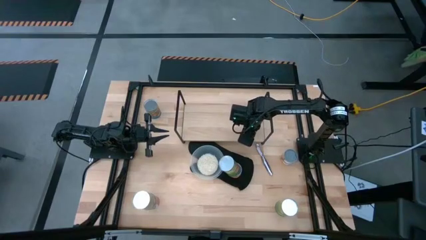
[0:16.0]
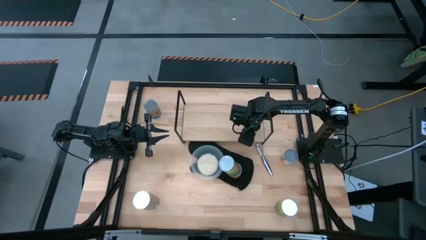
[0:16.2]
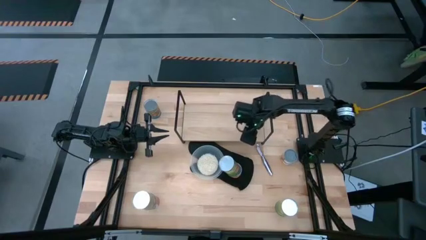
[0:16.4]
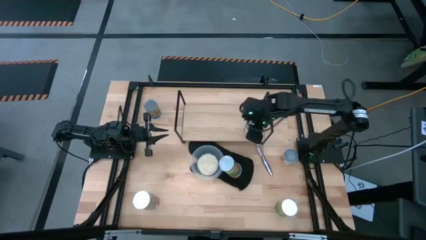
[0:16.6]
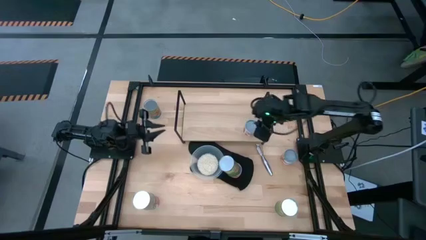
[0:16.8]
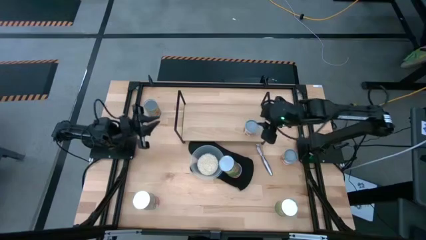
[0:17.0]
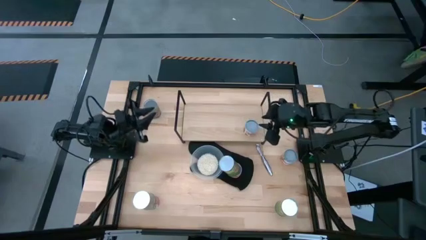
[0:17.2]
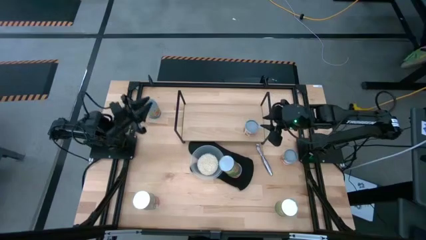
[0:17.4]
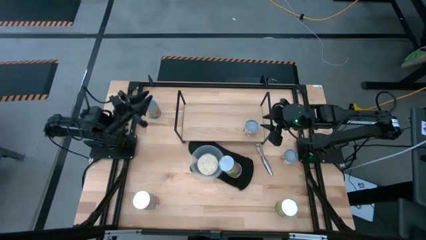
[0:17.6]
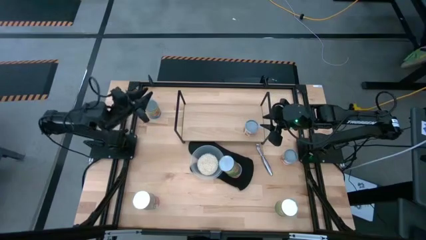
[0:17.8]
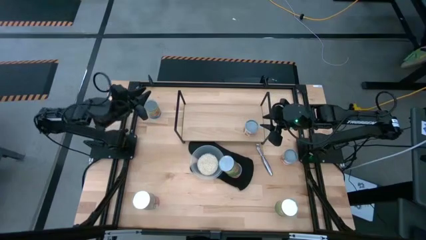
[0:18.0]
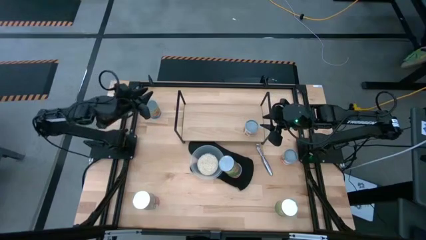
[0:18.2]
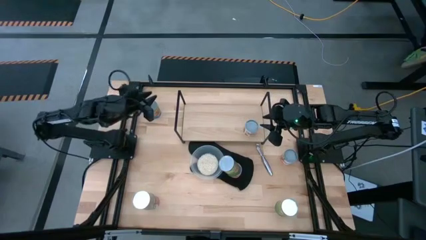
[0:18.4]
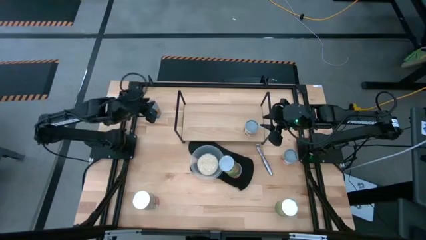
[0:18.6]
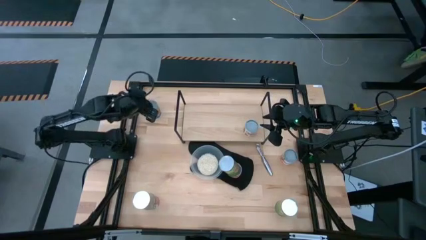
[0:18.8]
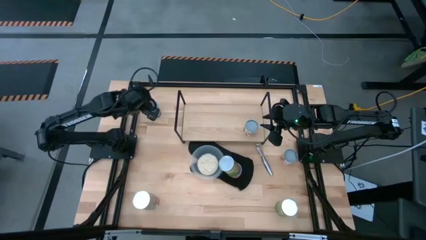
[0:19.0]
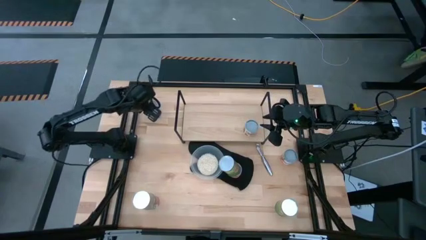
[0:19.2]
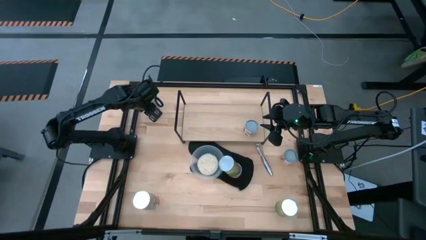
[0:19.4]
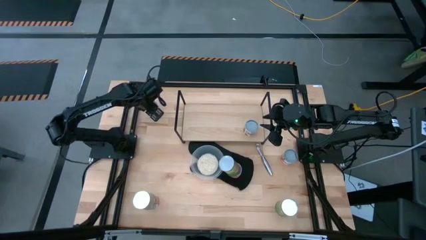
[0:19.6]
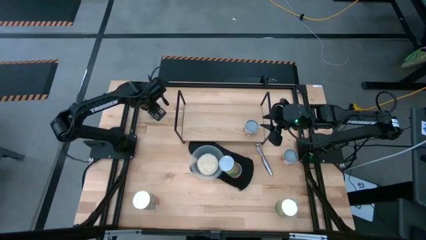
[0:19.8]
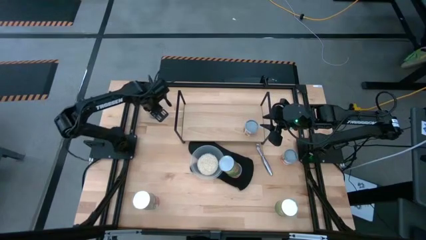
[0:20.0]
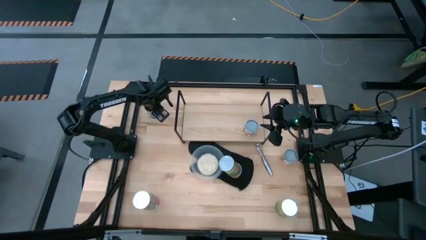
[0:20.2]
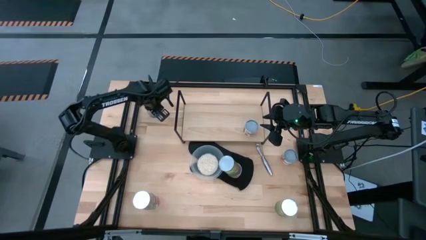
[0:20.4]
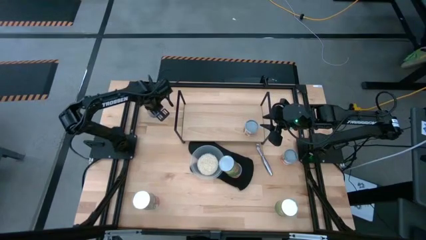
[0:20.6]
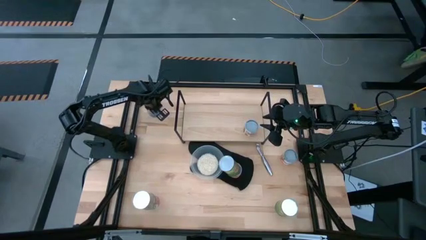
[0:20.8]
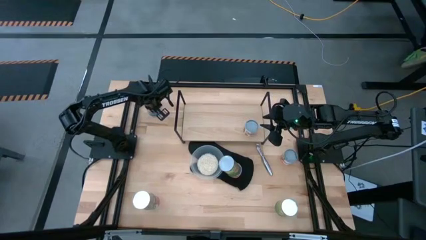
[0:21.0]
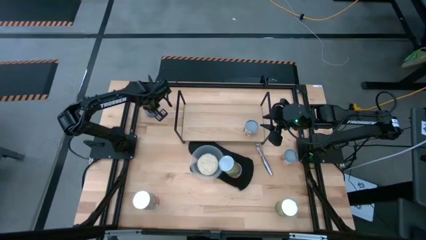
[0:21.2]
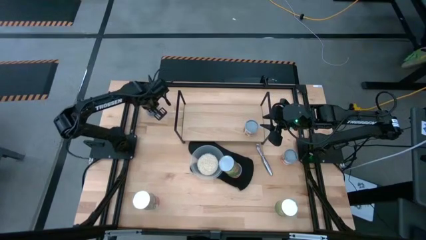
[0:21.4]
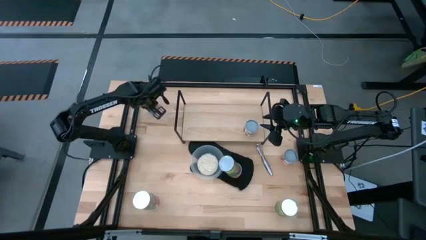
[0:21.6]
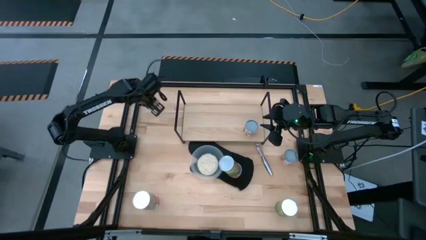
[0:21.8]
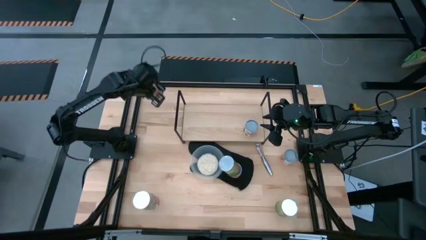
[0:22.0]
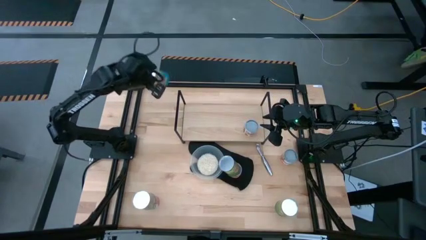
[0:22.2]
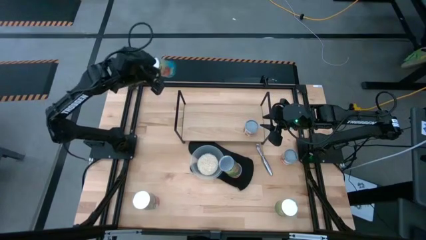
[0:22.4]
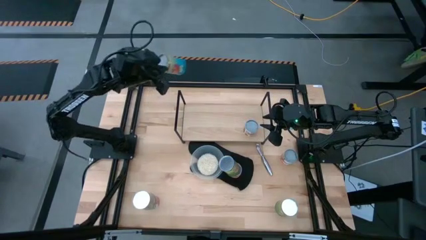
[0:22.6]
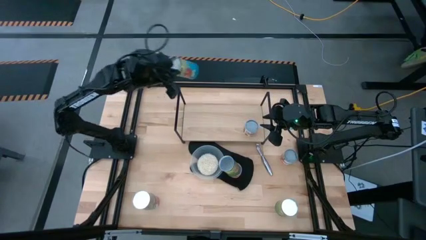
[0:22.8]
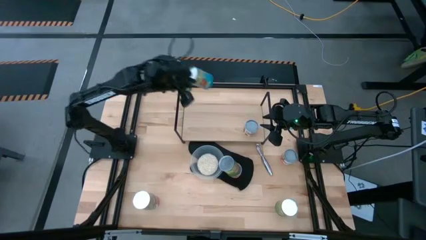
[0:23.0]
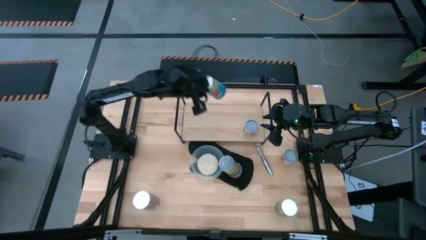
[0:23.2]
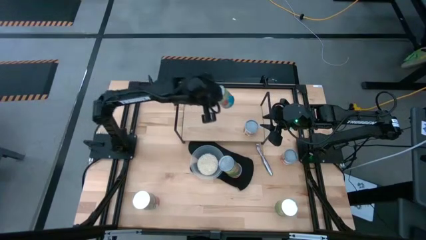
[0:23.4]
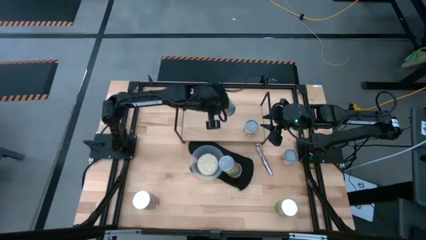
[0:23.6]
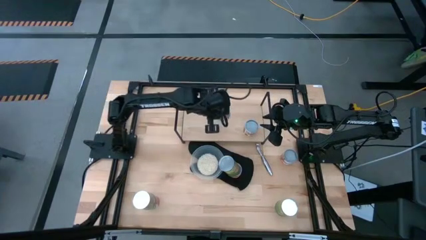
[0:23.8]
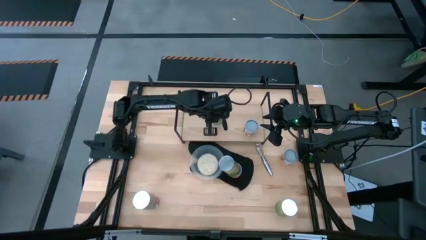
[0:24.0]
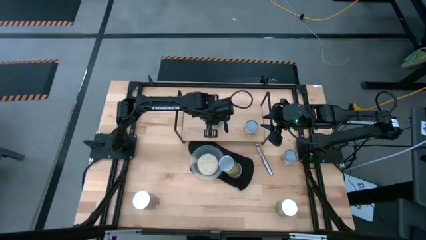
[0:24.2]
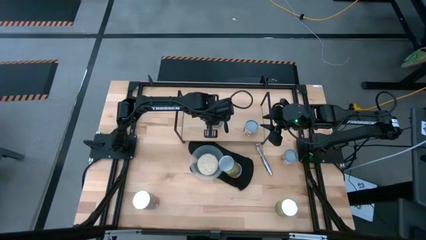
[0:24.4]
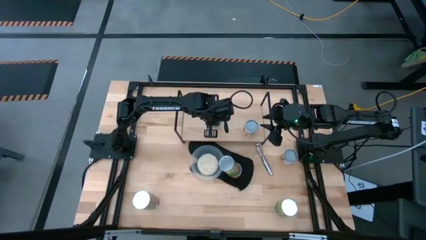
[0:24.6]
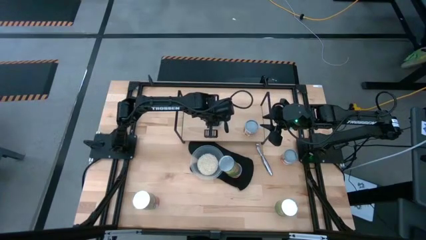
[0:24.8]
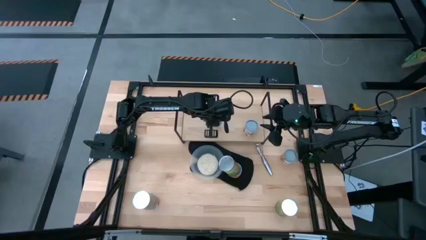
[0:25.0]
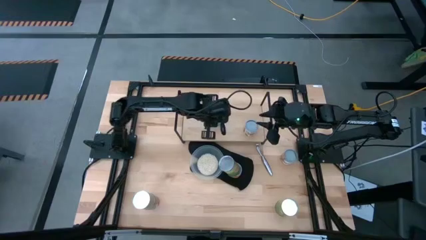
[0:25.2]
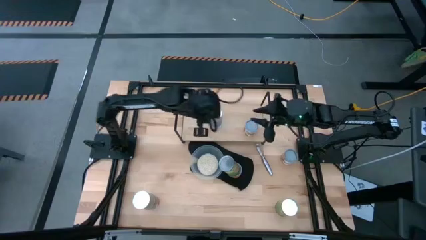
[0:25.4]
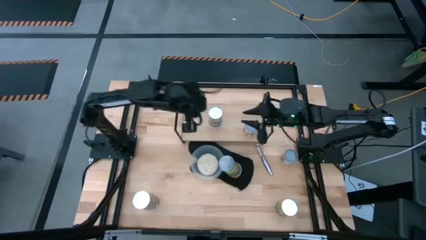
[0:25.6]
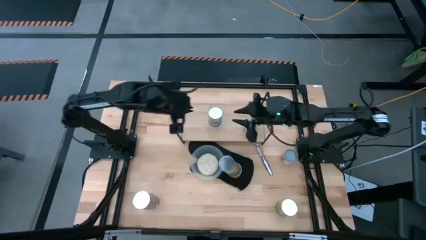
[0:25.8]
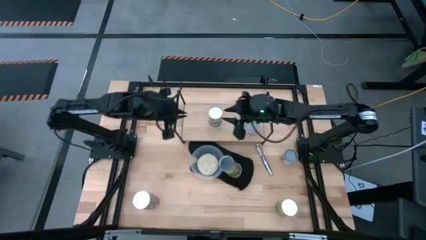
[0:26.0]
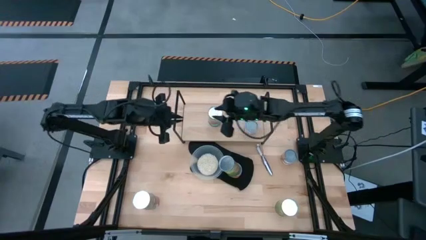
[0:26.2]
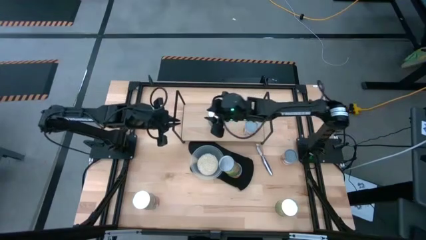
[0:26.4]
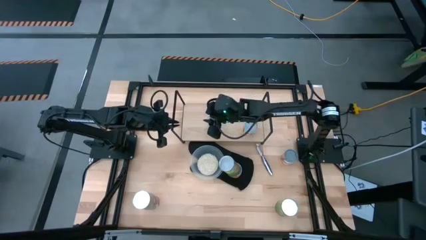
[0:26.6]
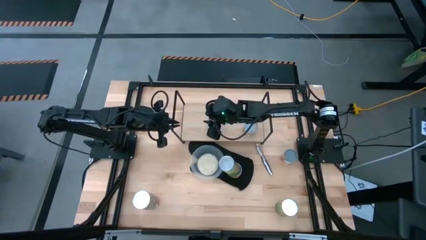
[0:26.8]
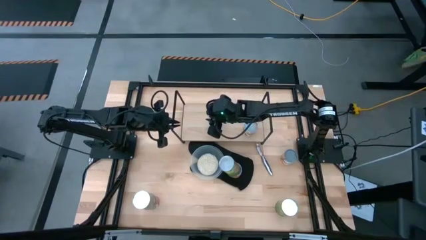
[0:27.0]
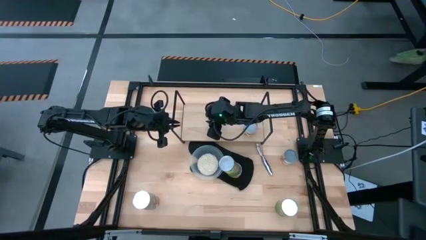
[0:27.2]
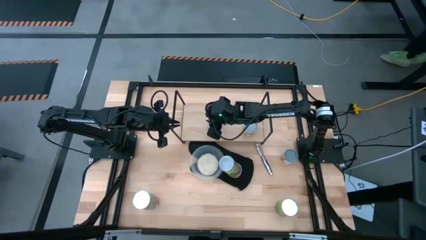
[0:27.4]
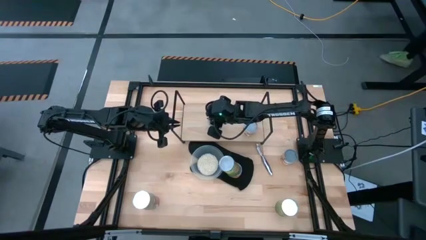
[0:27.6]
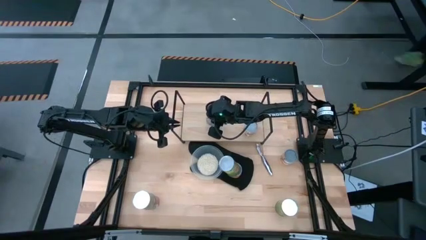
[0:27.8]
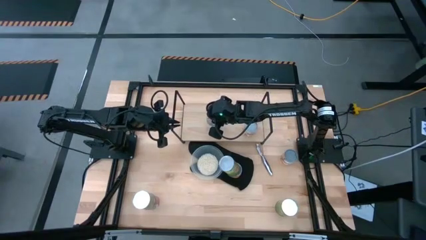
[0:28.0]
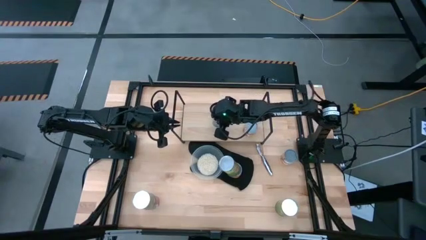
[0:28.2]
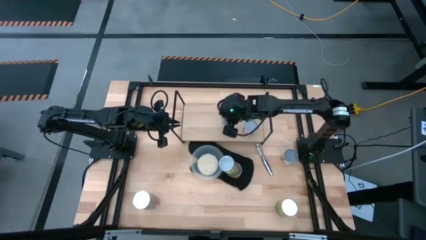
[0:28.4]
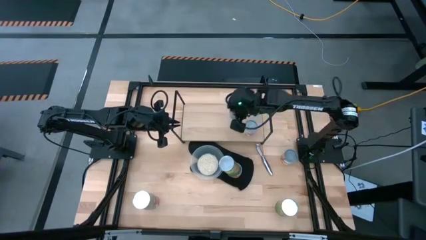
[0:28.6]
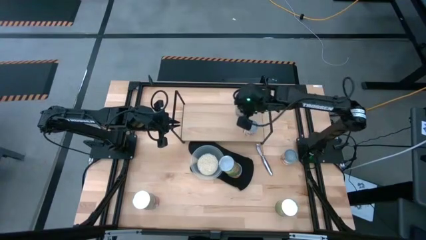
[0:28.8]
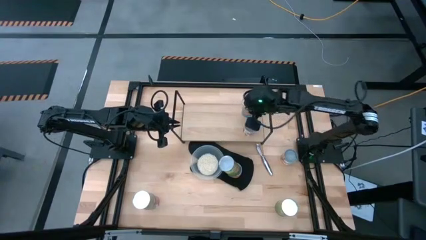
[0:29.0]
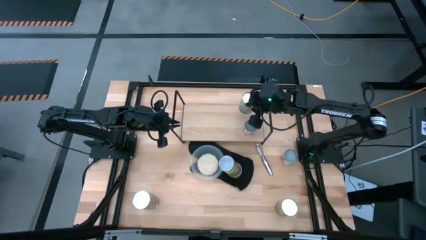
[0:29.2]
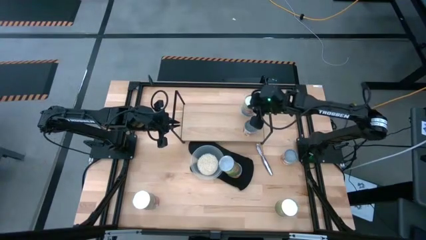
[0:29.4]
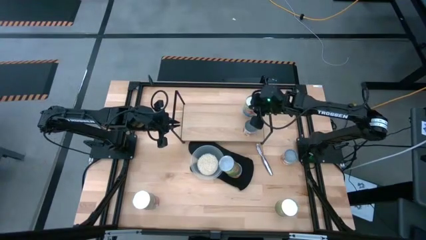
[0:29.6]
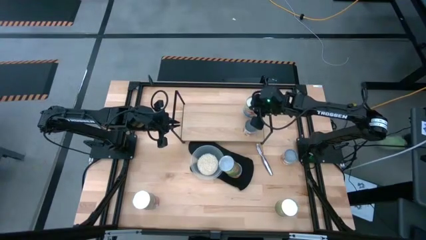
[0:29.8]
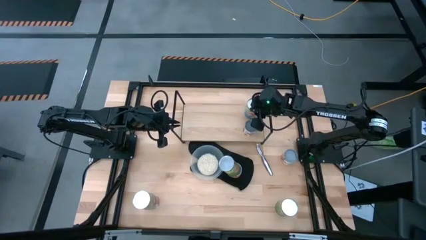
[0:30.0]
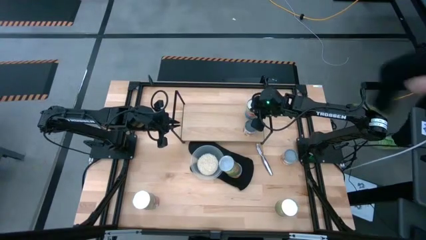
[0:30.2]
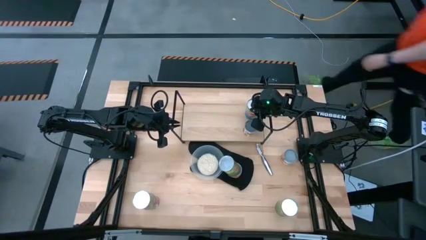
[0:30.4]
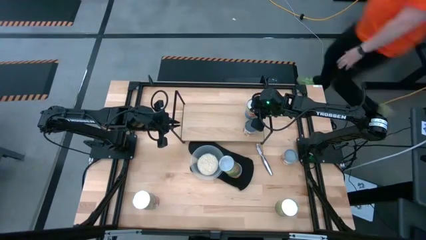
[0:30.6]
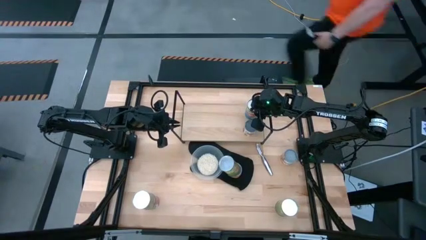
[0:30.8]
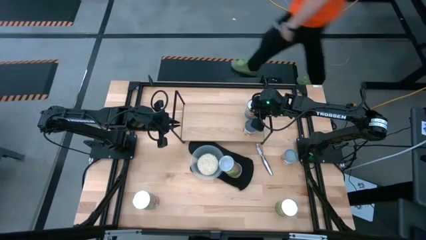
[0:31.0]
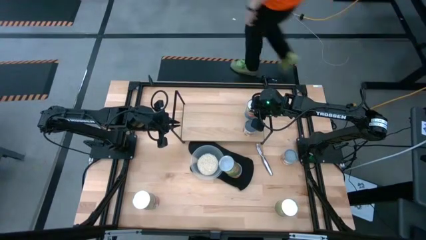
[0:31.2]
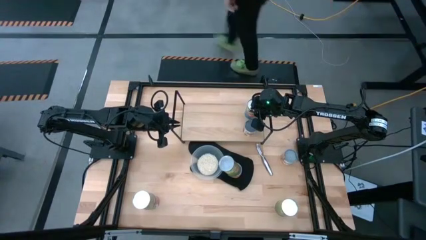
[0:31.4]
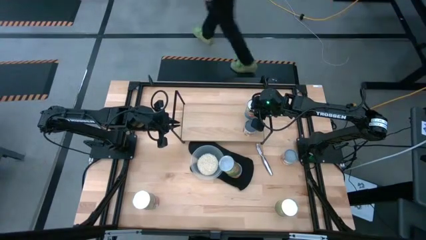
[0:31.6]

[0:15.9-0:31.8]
Task: Pick and place cans onto a shelf
Put the canned tomatoes on the shelf
